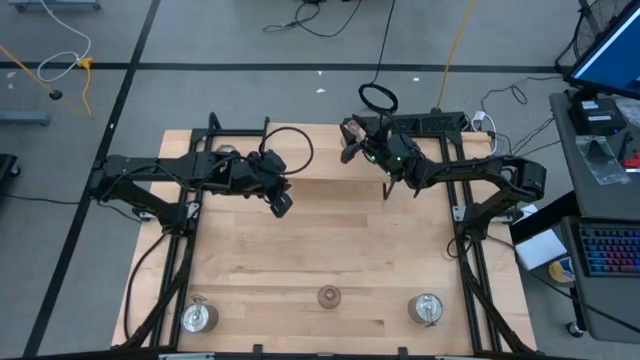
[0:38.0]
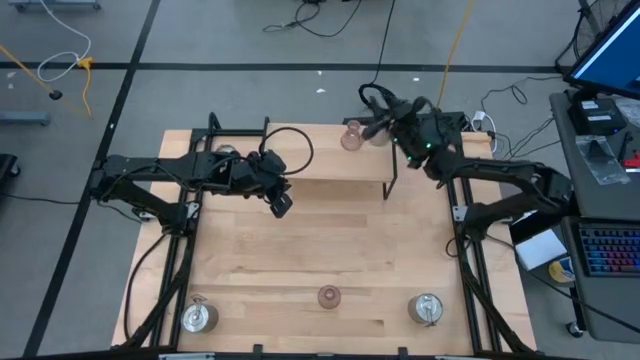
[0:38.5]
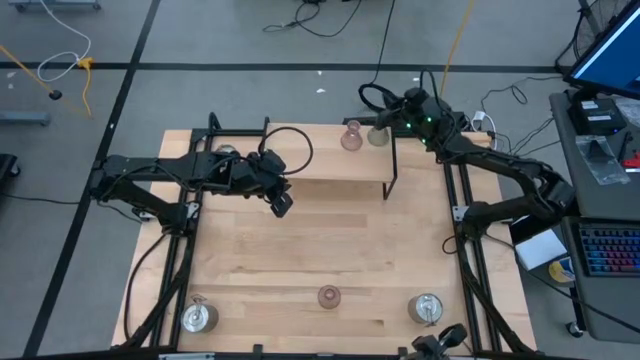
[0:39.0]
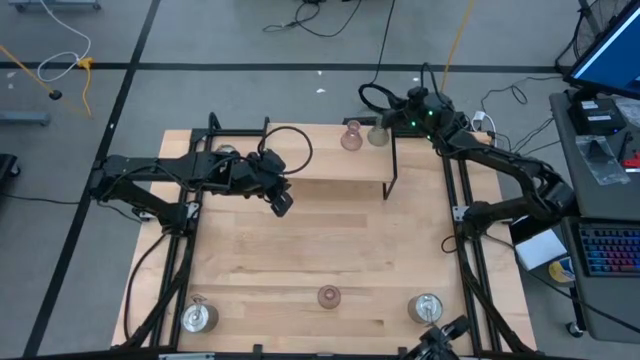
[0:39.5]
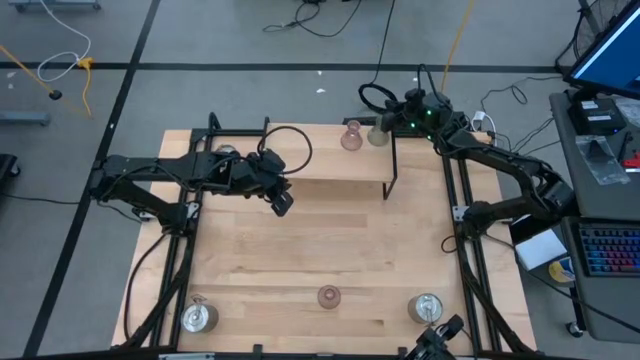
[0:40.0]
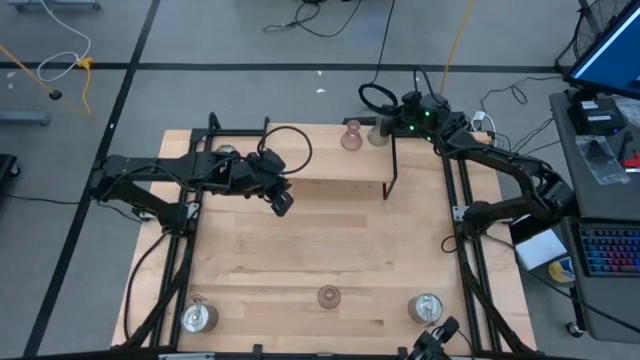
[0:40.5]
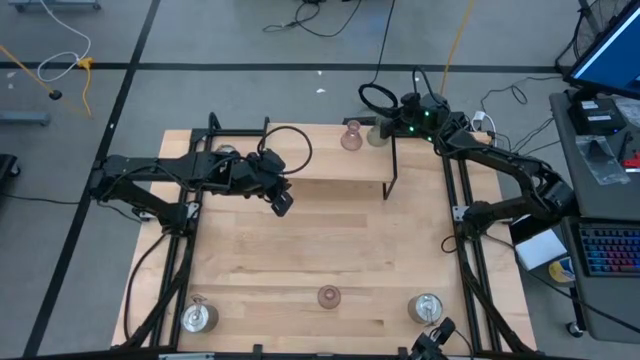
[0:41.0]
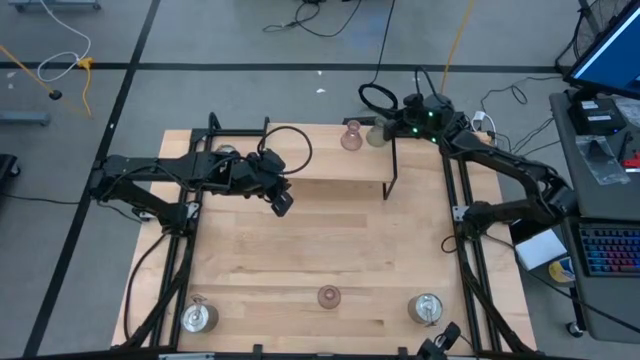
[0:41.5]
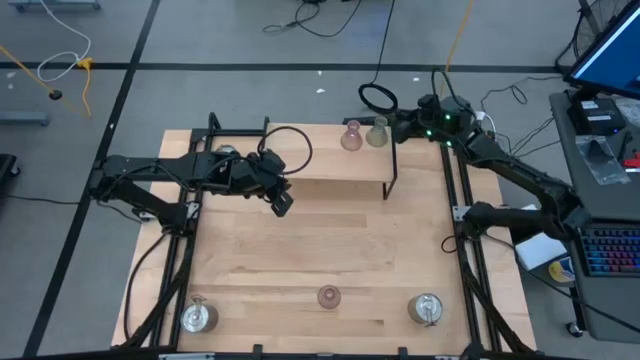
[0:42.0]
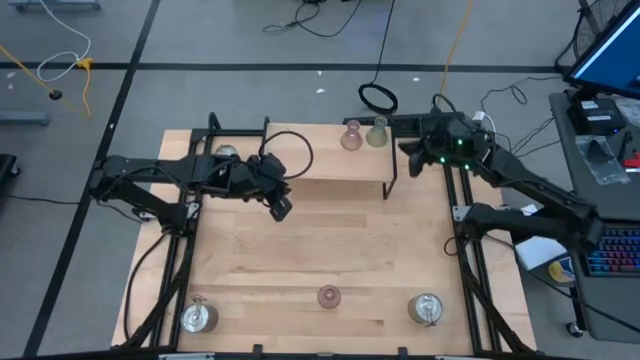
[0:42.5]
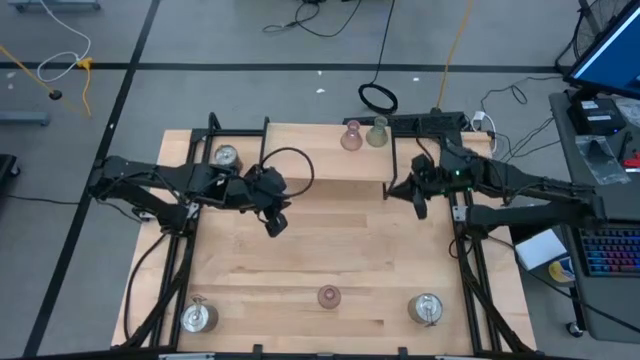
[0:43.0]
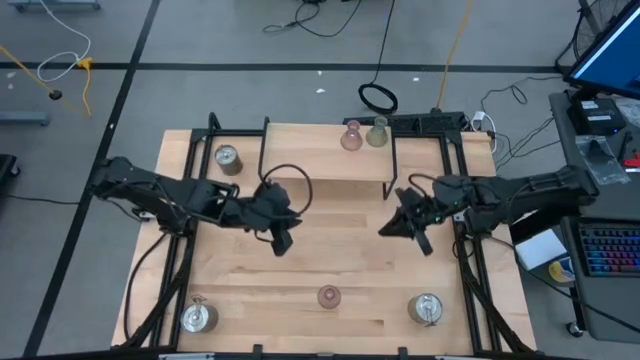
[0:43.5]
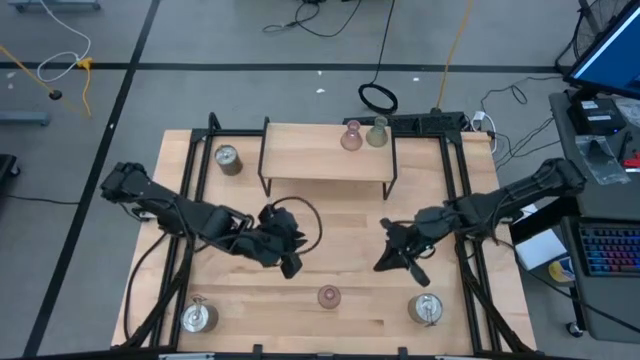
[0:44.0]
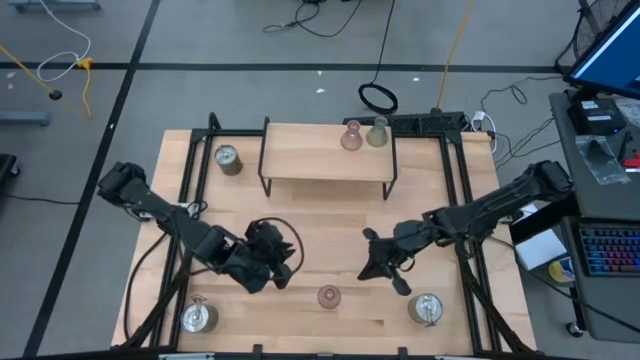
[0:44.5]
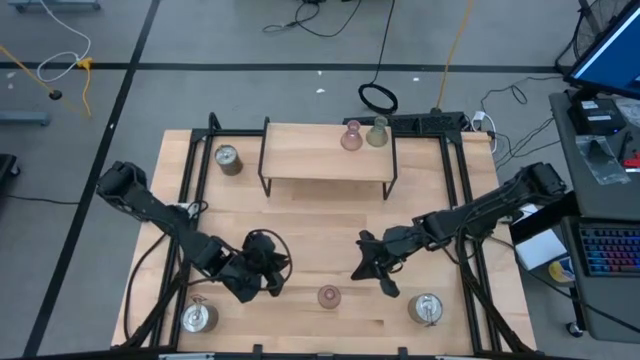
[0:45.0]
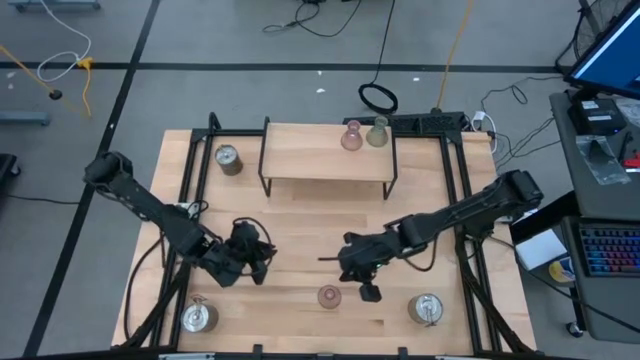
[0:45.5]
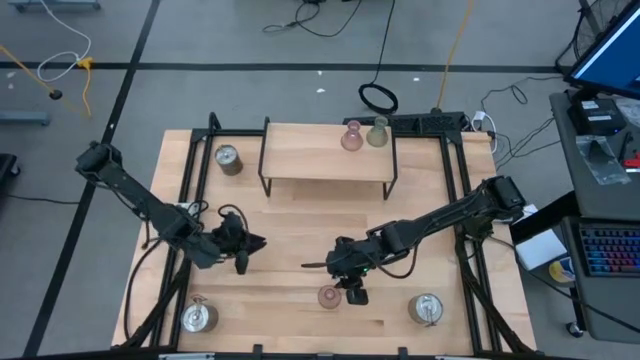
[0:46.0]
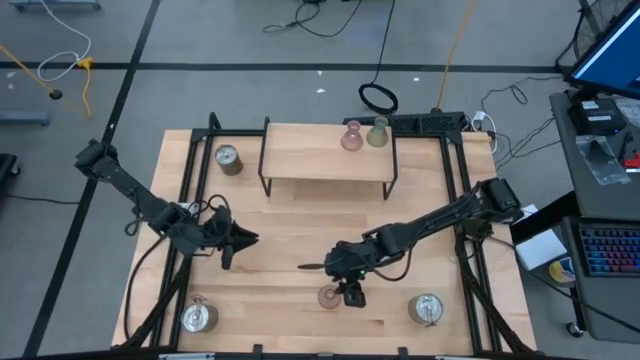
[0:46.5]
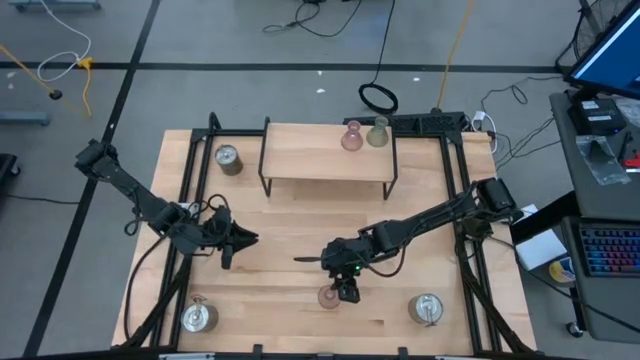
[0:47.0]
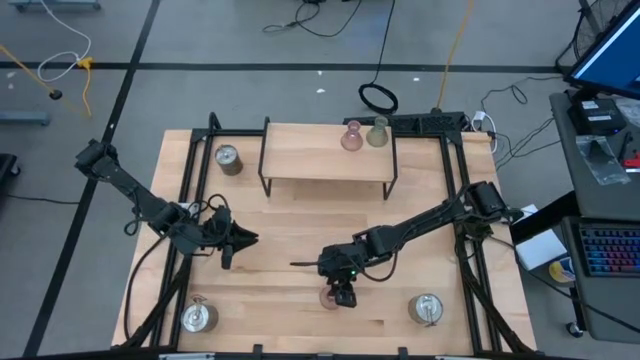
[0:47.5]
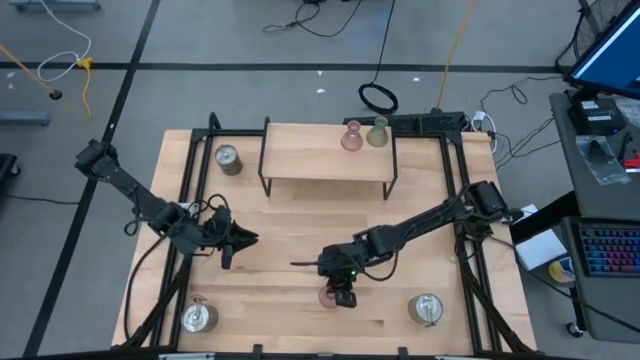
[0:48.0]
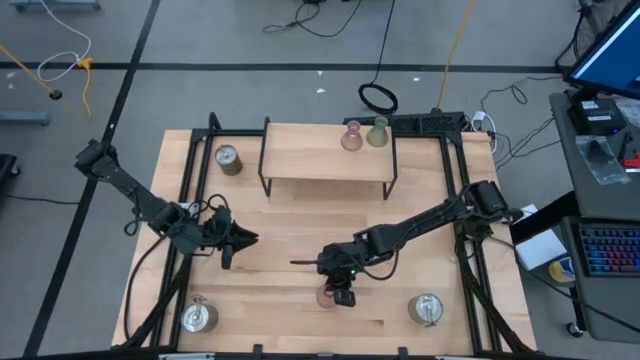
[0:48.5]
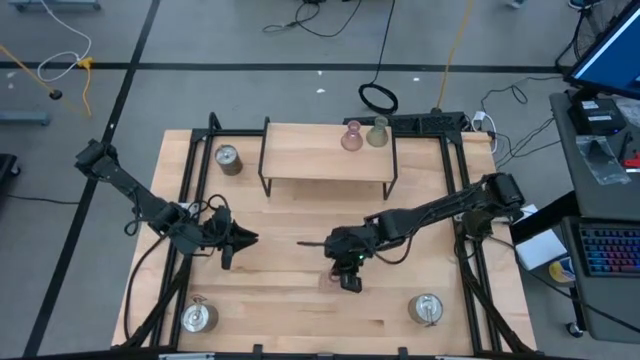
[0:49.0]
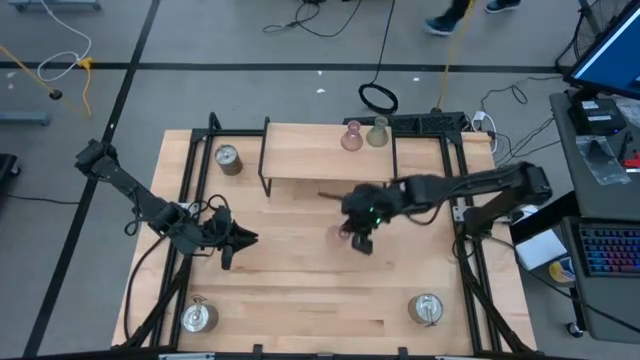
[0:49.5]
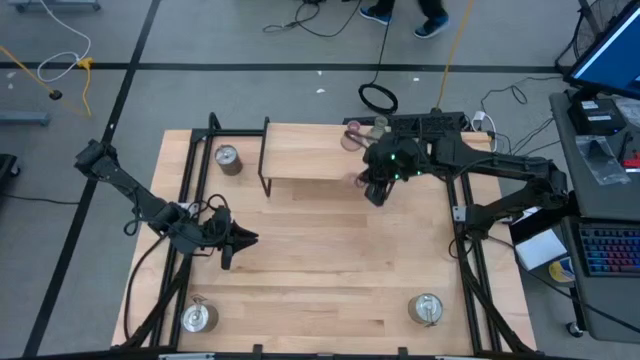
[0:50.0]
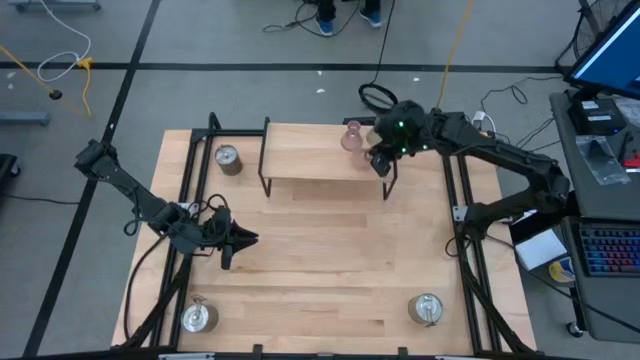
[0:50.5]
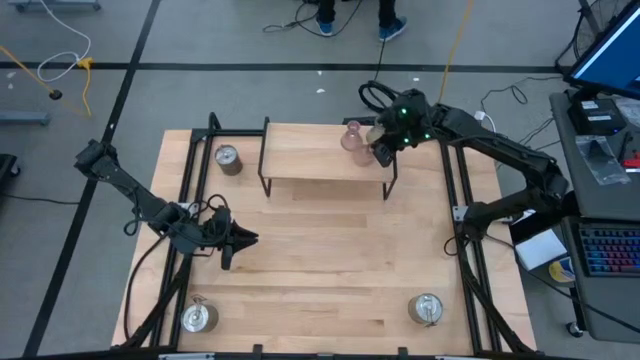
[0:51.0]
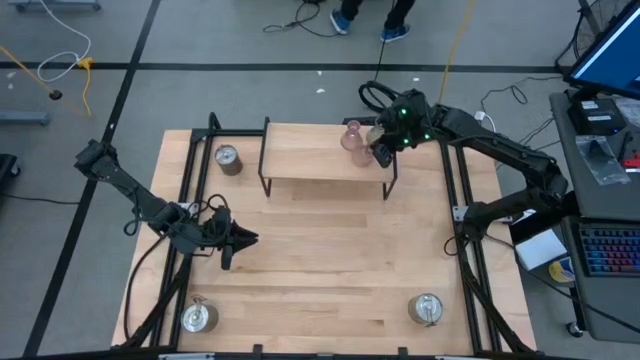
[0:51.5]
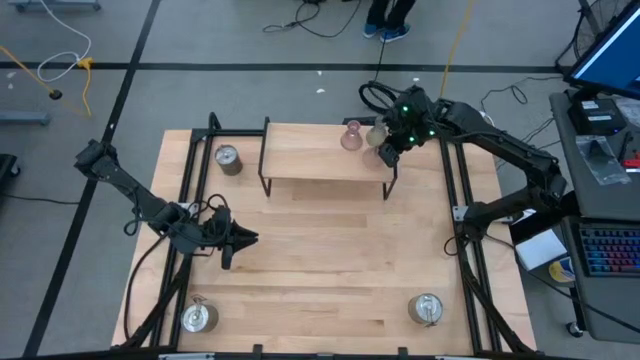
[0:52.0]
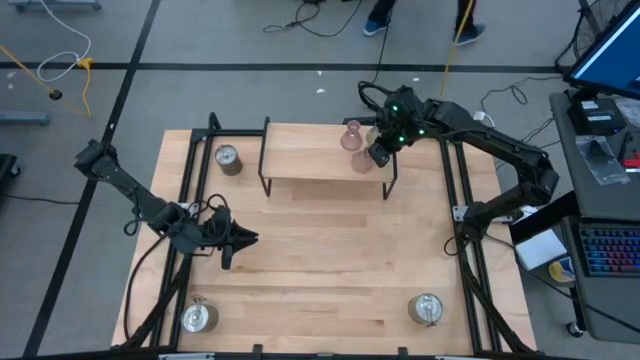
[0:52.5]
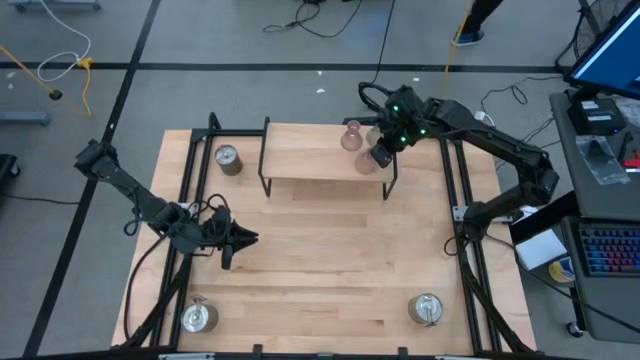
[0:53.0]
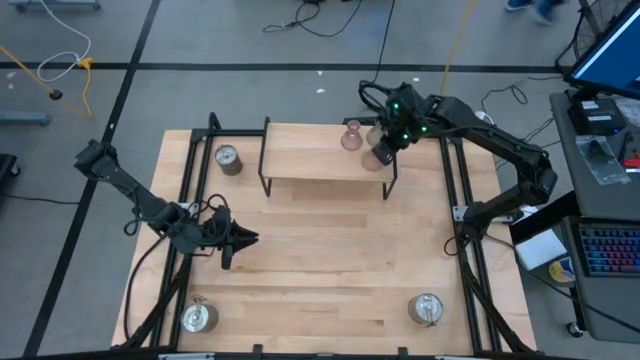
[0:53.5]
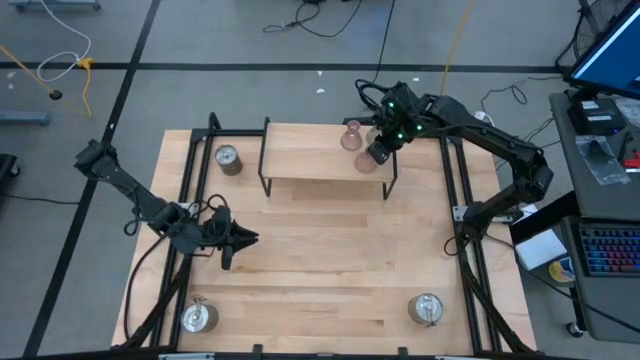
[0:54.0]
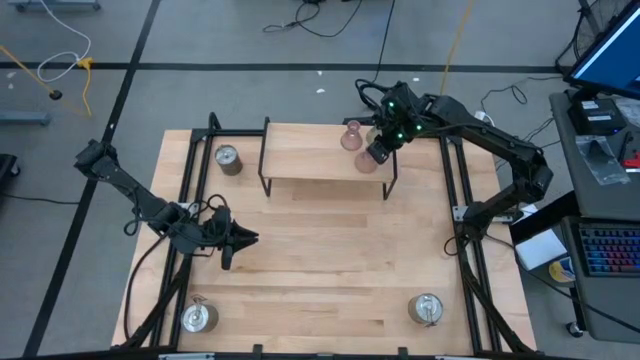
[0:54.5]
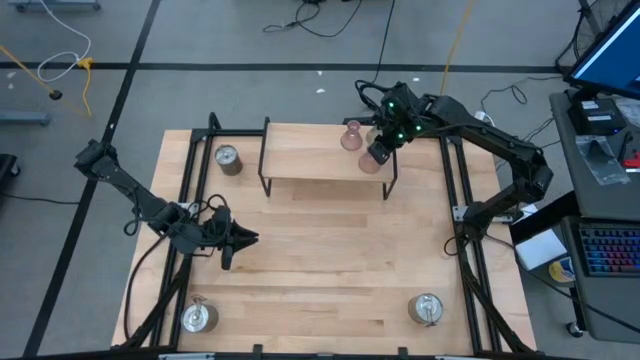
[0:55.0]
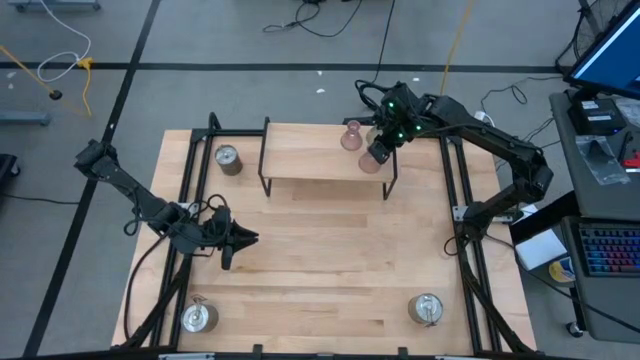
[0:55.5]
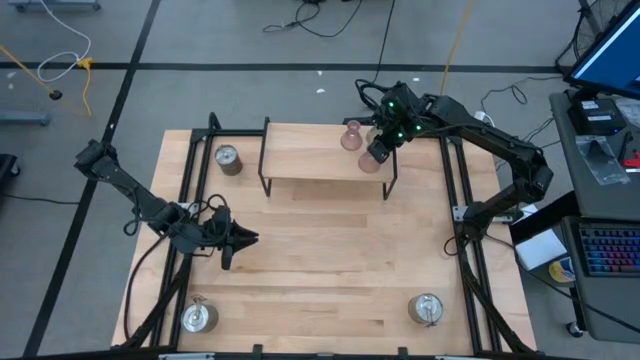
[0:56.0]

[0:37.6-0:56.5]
Task: Pick & Place candle stick holders
Put the pink candle holder on the shelf
